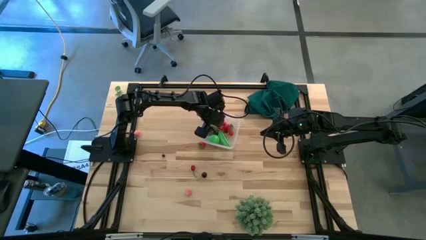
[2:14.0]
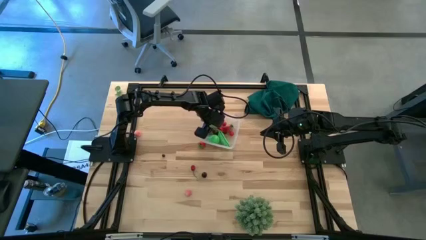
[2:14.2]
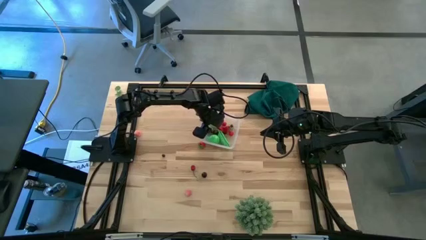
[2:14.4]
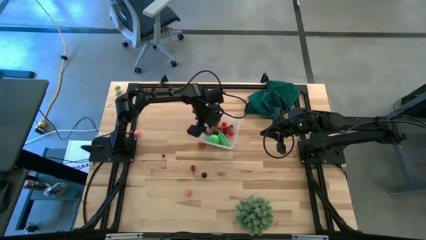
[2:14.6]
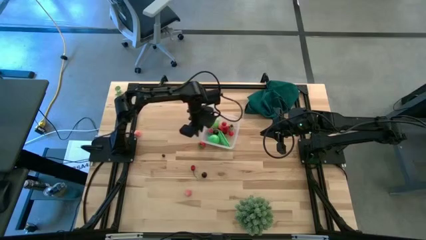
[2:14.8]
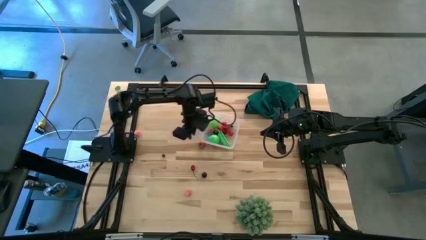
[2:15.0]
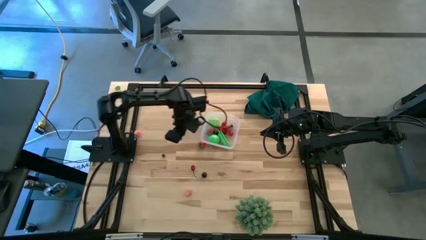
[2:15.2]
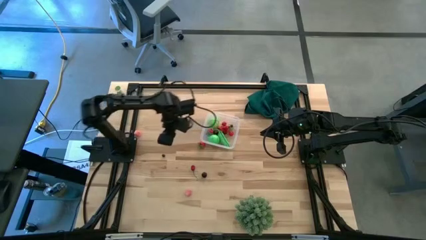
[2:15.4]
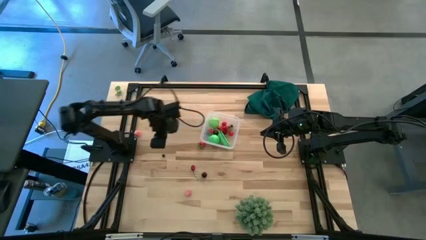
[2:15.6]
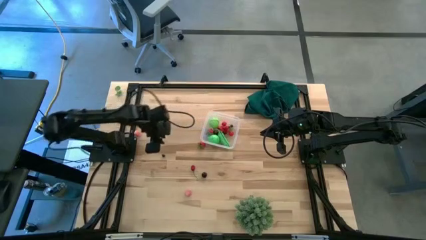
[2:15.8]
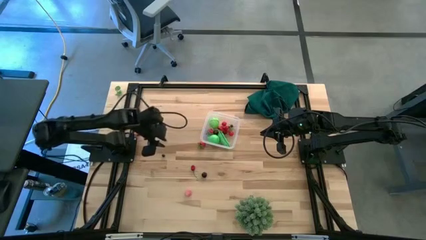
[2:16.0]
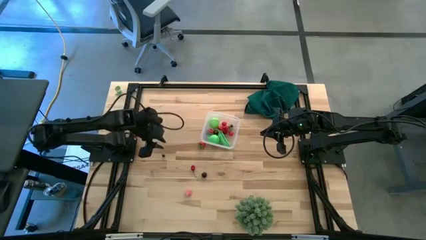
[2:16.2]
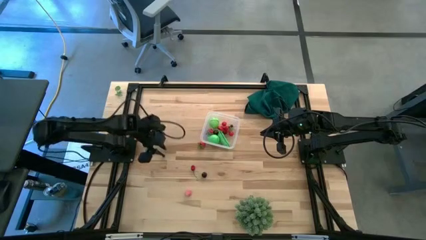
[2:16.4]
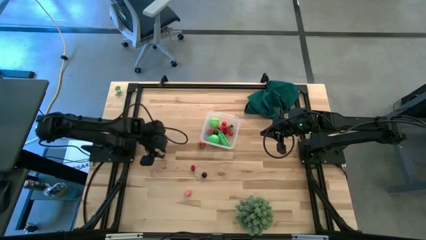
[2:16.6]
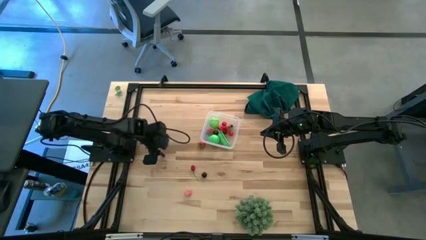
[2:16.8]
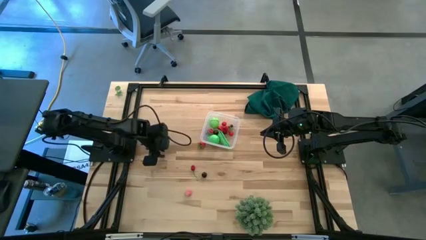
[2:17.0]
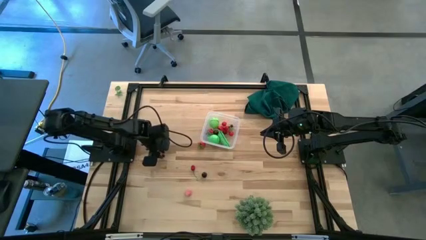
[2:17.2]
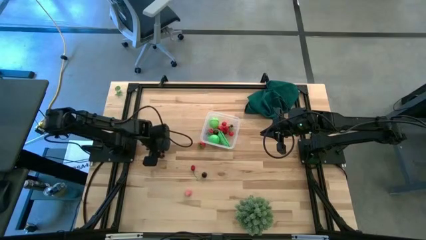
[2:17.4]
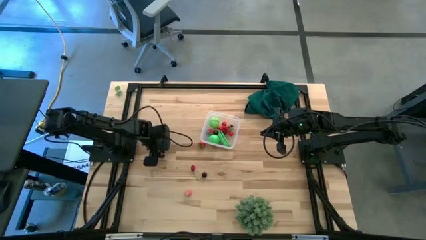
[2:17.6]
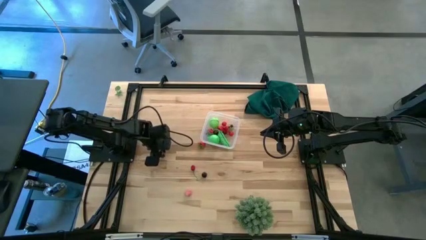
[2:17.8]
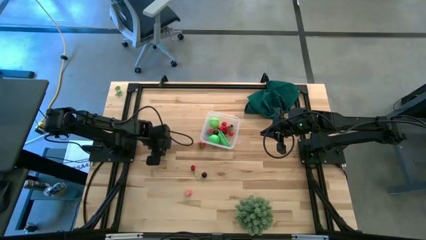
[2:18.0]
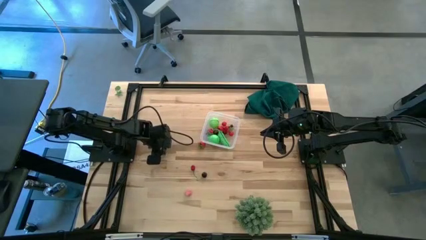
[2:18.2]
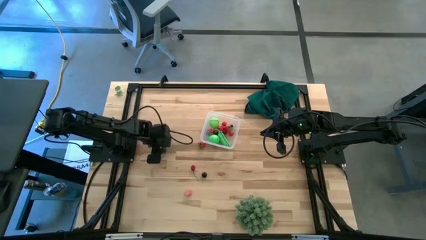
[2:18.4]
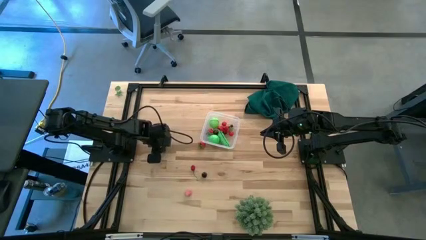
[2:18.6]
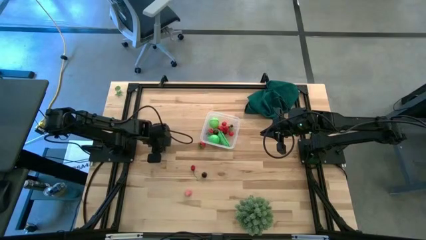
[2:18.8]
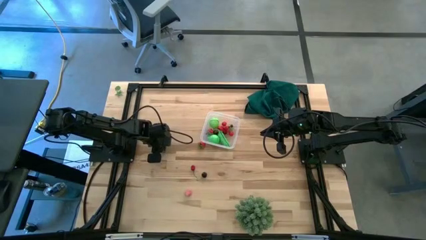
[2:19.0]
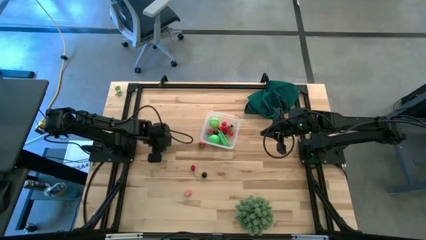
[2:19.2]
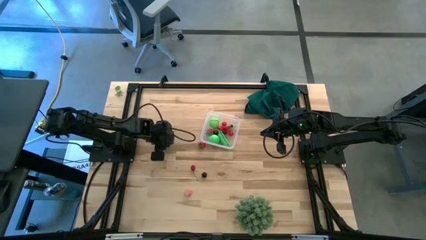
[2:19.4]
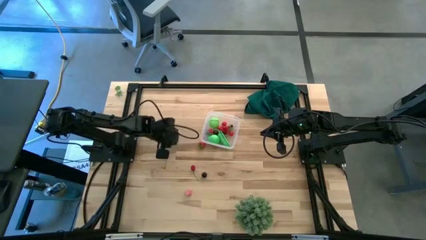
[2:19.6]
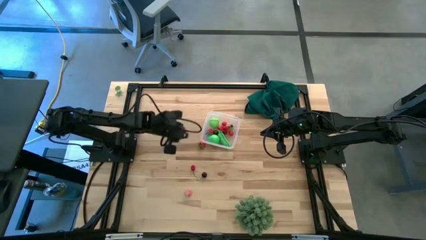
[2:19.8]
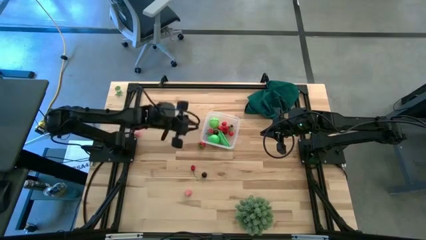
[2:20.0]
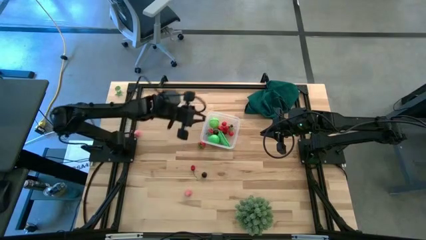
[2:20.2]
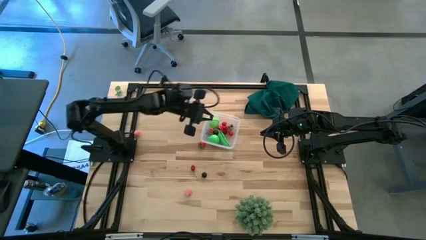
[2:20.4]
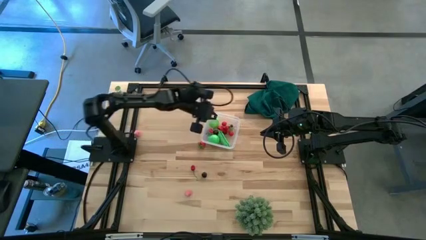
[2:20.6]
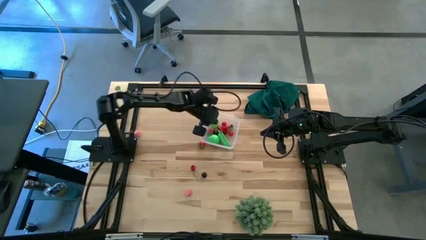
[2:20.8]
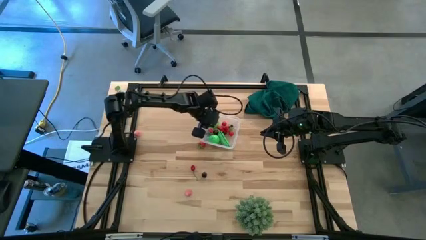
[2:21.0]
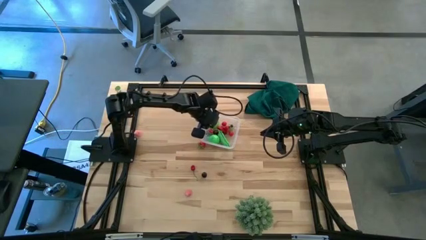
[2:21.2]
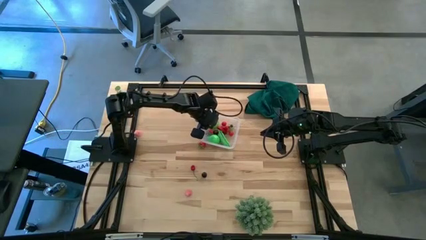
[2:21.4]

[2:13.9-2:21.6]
Task: Pick and placing Produce into tupperware
Put the blueberry into the transparent bin

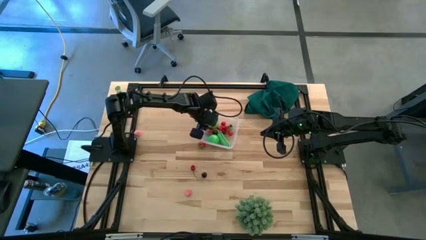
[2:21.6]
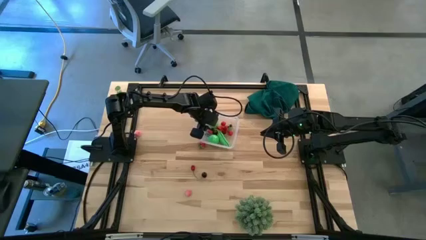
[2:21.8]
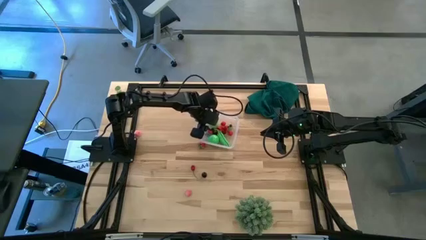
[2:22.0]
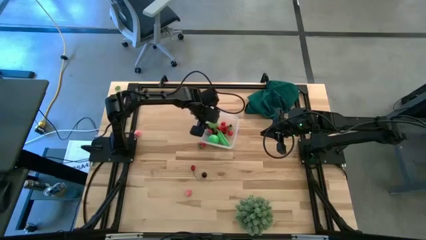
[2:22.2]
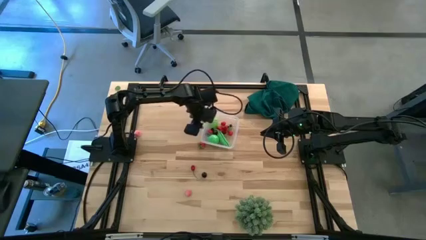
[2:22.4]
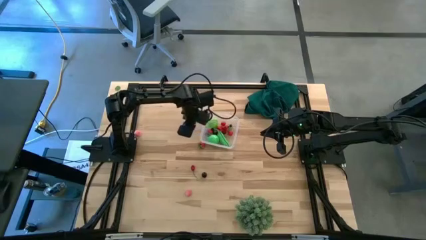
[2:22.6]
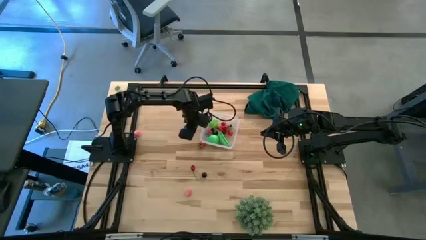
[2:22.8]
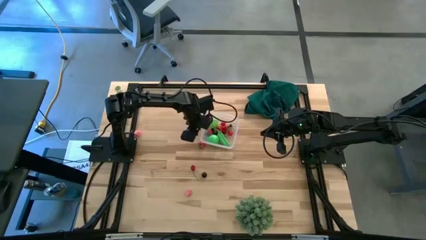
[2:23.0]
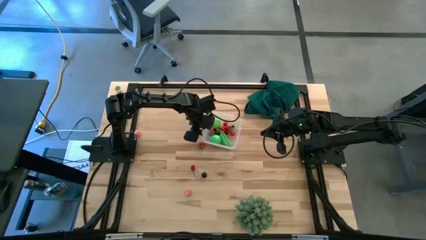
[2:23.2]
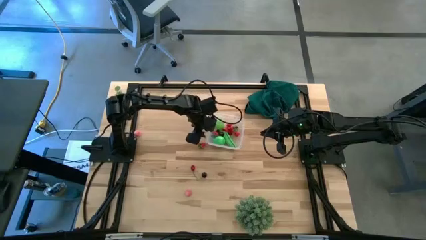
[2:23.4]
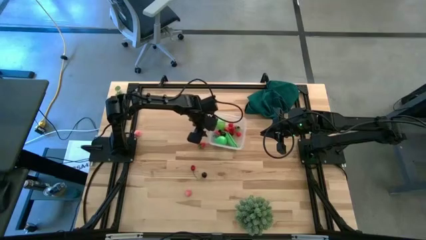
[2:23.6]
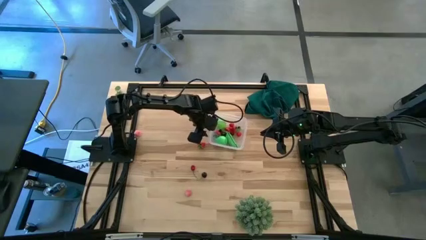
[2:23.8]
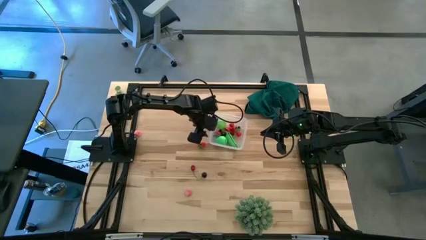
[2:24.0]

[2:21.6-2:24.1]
Adjust the transparent bin

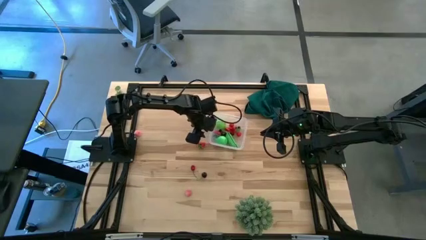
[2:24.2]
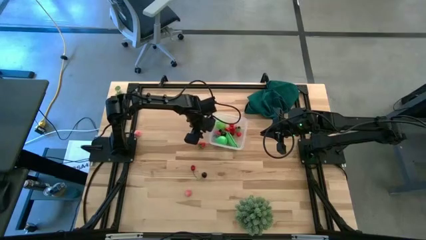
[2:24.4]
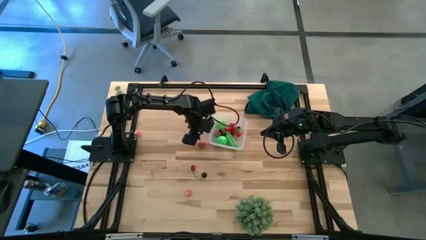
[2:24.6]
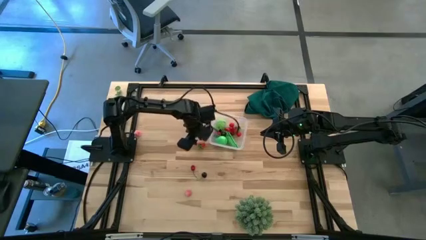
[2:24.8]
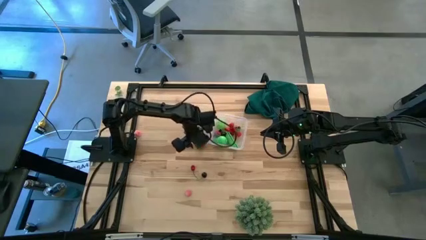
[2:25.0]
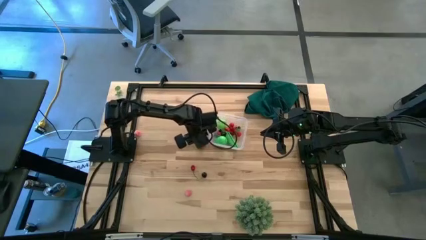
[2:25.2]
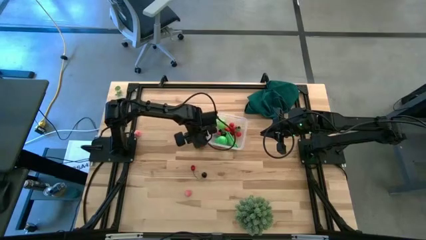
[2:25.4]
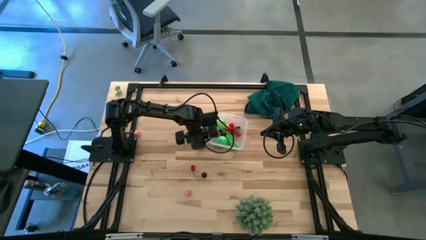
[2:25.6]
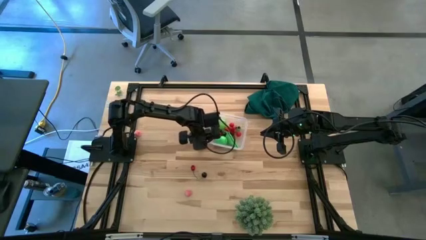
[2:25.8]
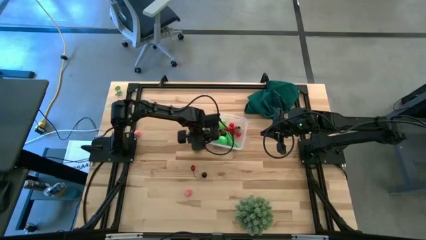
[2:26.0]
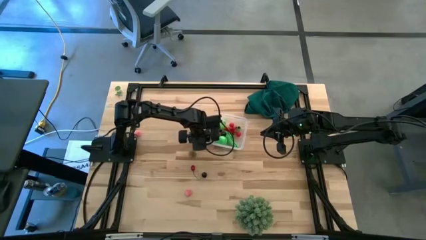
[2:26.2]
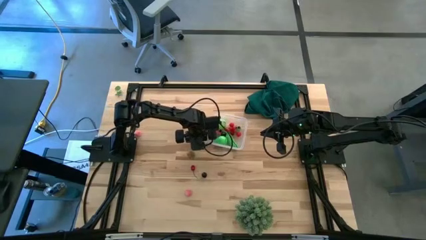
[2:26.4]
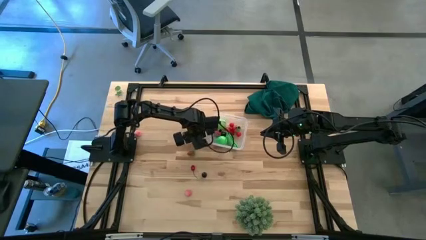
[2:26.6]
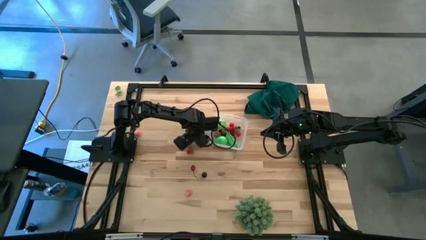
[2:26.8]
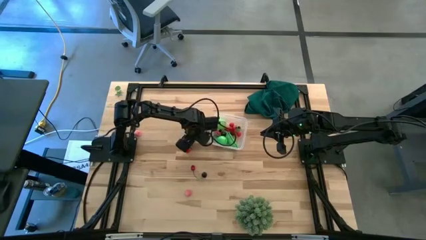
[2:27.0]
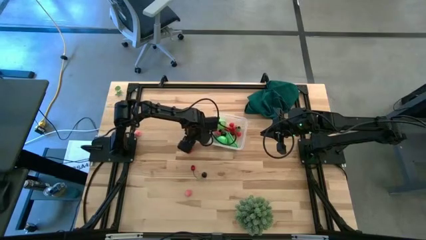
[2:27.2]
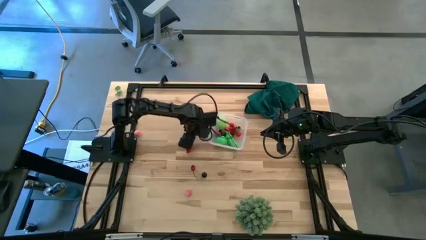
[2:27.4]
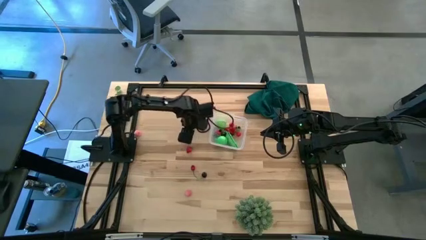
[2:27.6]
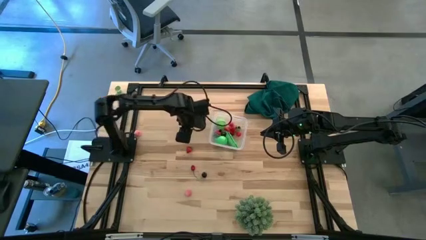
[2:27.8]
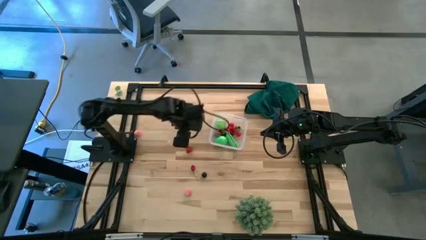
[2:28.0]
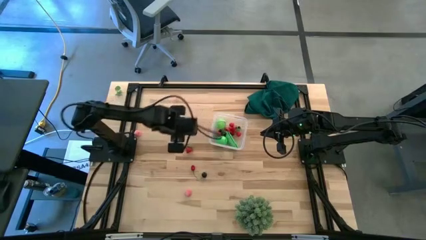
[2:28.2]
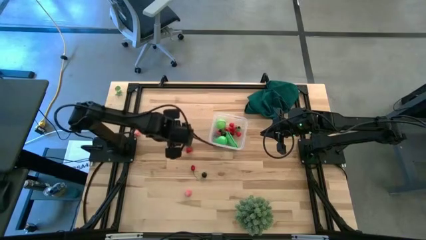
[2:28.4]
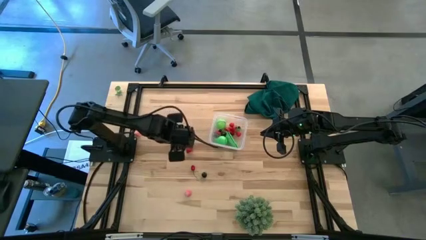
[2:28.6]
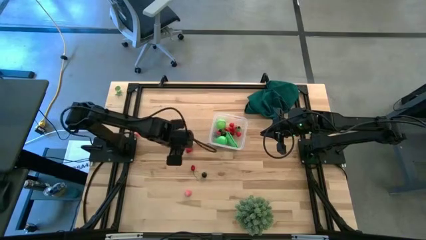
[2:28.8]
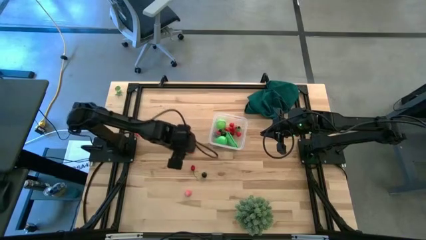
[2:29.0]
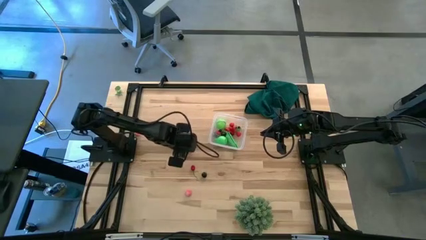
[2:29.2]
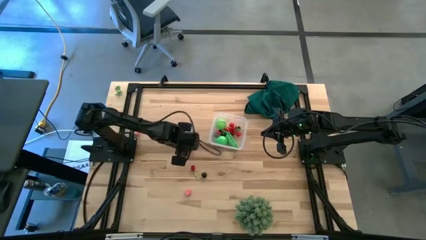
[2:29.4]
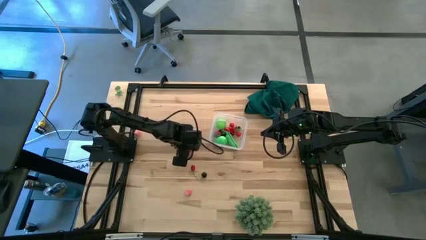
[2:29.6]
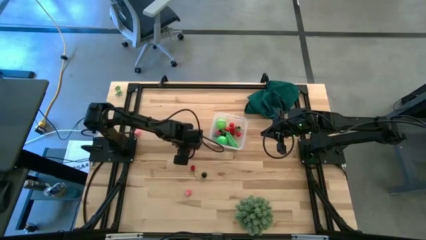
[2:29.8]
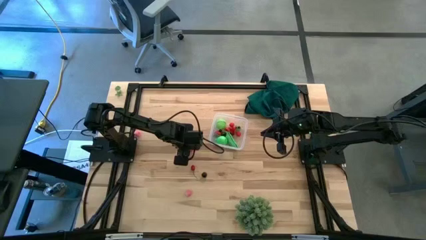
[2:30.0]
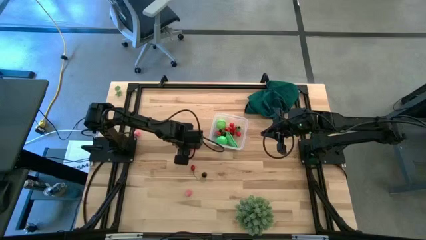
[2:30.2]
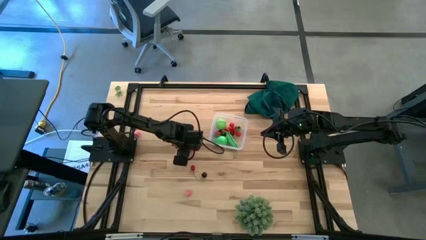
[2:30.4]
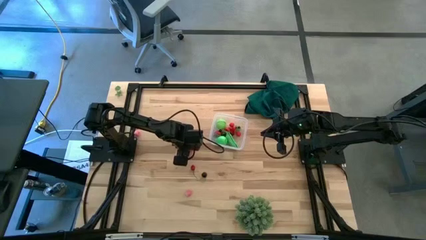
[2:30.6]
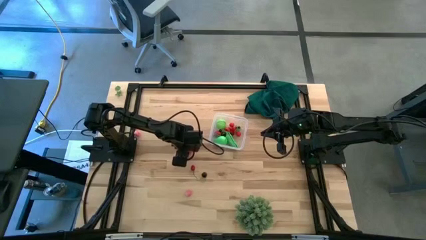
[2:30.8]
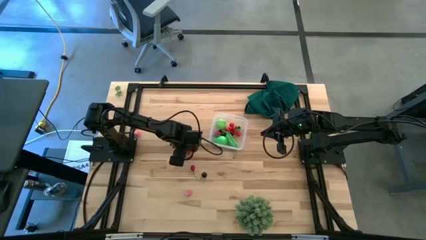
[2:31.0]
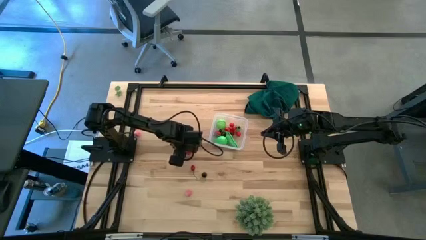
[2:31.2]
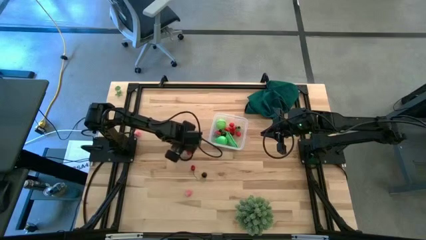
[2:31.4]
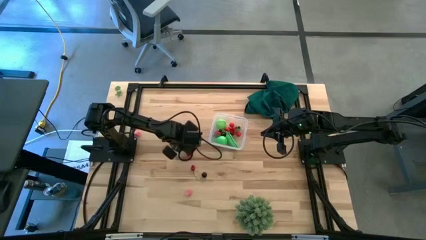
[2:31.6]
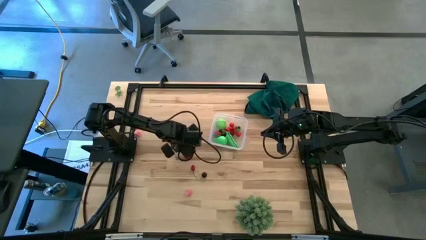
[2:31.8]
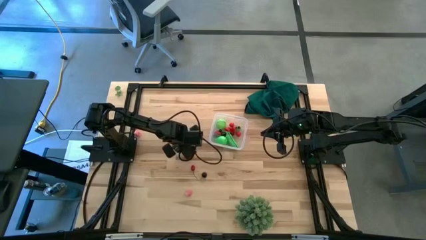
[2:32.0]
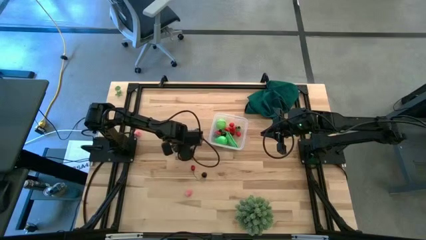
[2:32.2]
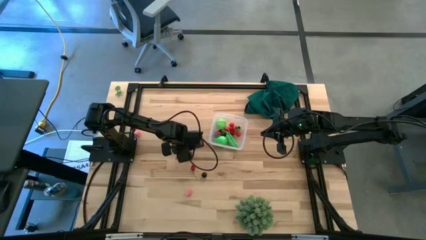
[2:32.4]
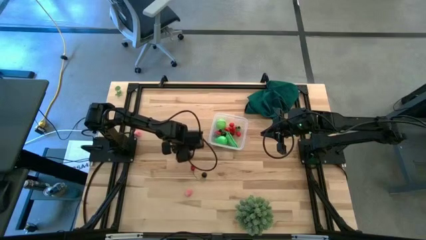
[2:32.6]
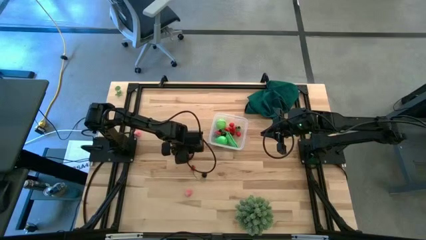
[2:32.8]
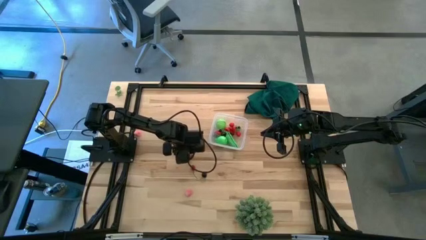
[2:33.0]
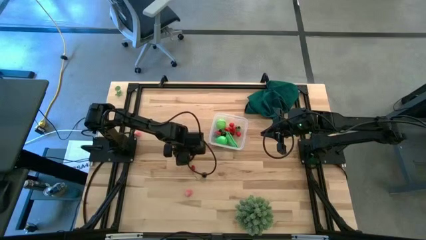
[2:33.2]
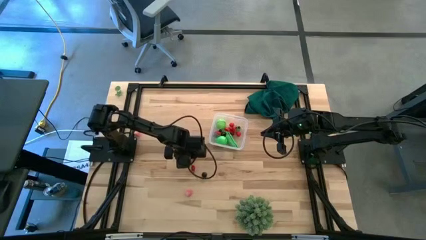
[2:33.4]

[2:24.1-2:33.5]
Put the red strawberry into the transparent bin
